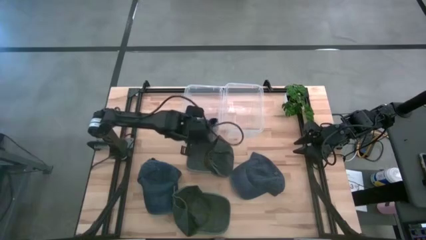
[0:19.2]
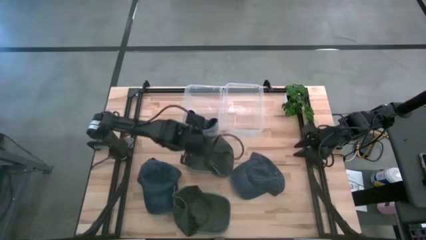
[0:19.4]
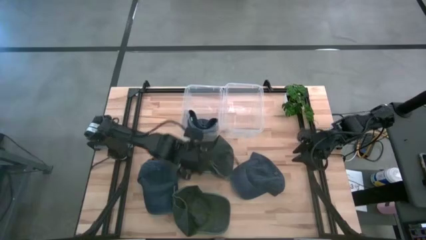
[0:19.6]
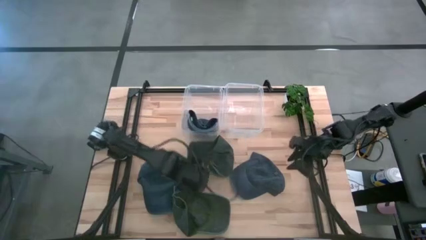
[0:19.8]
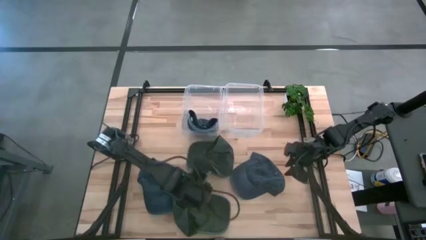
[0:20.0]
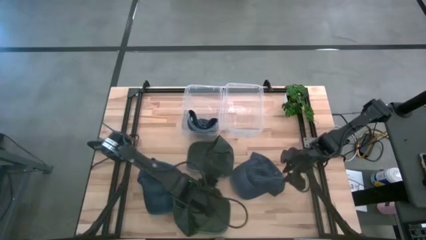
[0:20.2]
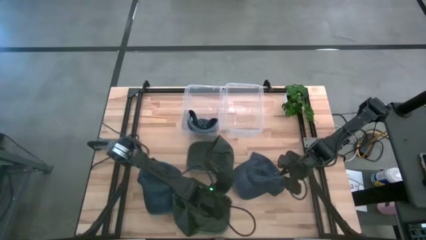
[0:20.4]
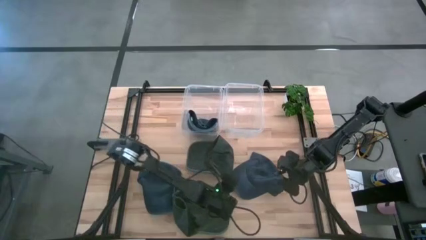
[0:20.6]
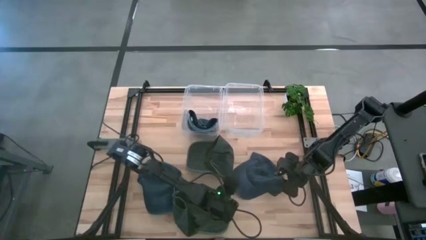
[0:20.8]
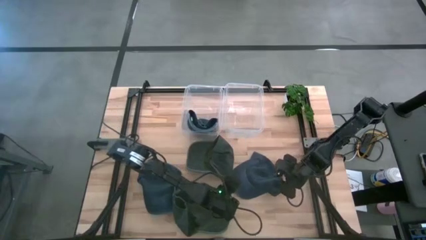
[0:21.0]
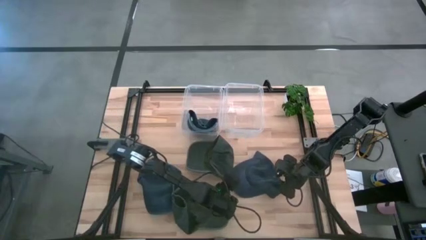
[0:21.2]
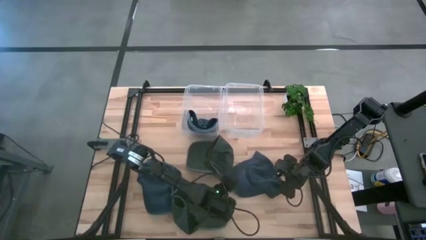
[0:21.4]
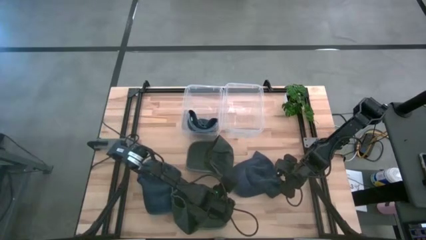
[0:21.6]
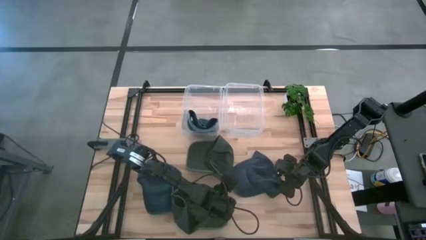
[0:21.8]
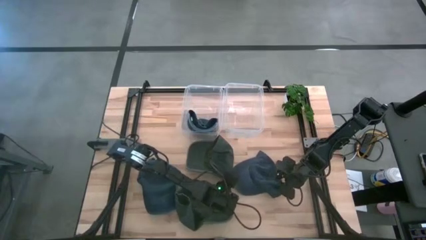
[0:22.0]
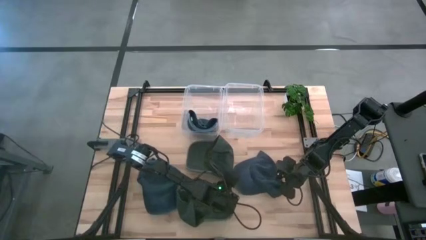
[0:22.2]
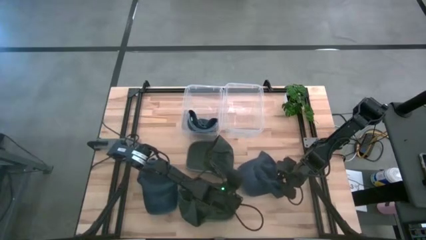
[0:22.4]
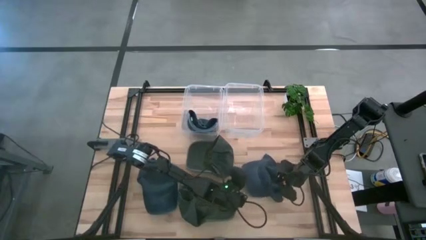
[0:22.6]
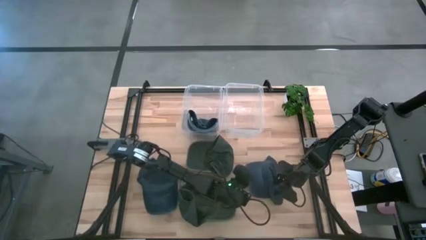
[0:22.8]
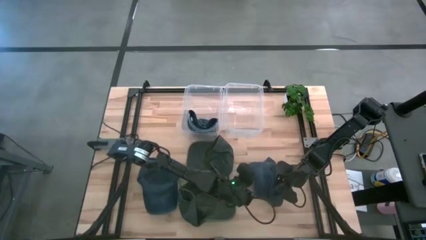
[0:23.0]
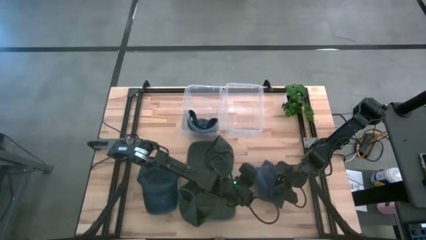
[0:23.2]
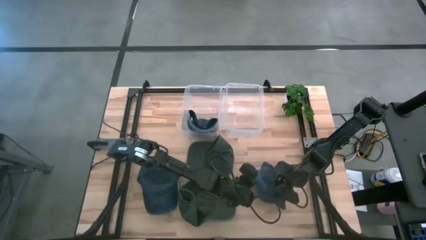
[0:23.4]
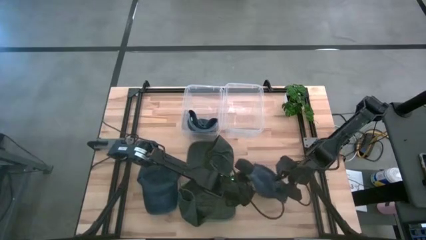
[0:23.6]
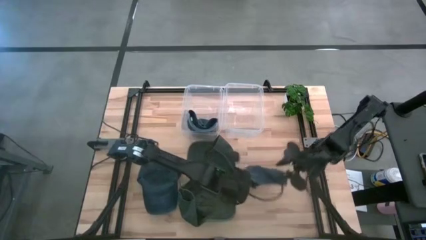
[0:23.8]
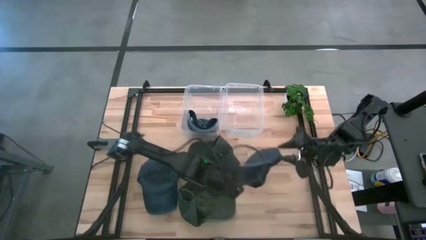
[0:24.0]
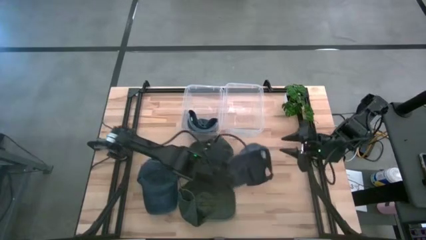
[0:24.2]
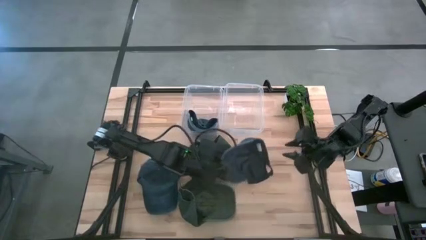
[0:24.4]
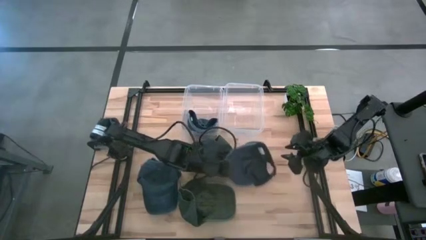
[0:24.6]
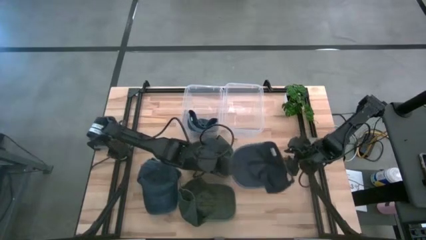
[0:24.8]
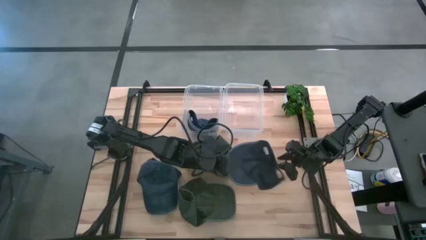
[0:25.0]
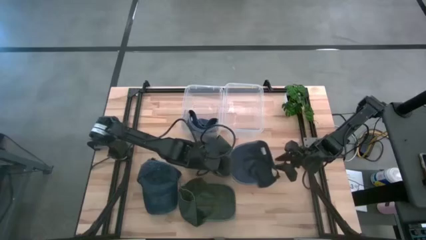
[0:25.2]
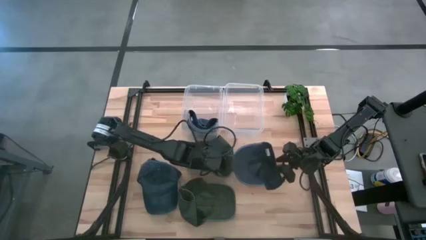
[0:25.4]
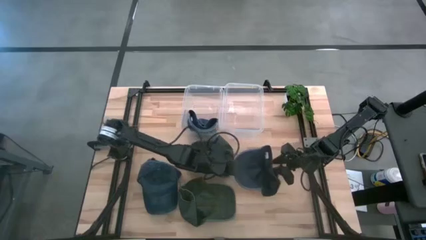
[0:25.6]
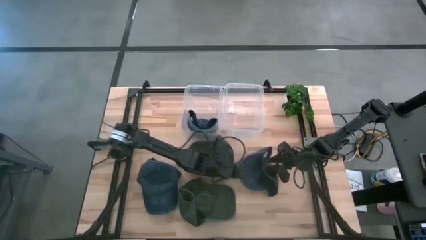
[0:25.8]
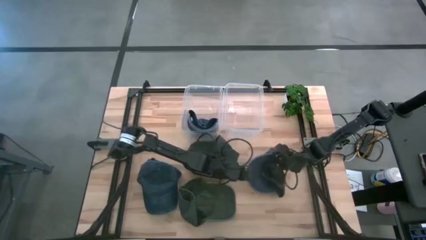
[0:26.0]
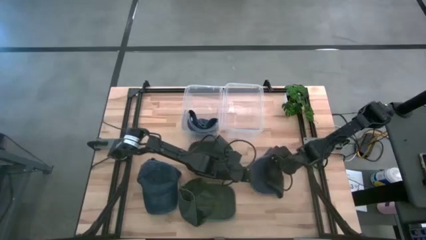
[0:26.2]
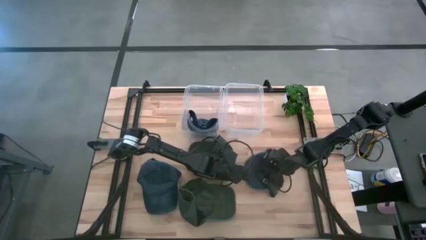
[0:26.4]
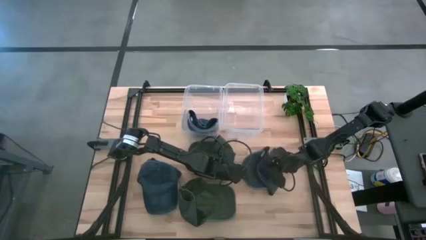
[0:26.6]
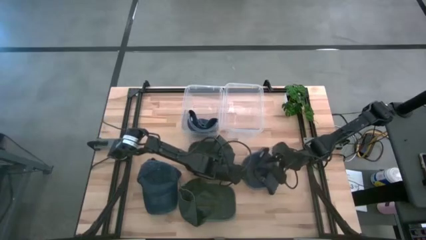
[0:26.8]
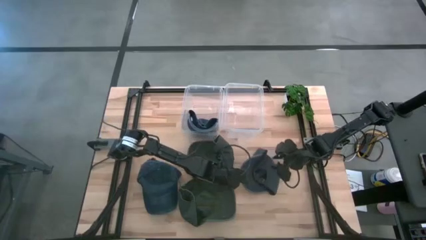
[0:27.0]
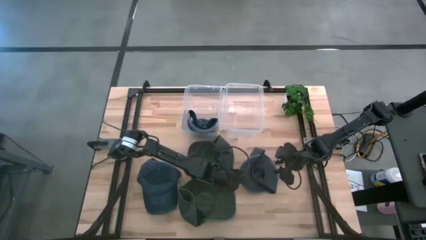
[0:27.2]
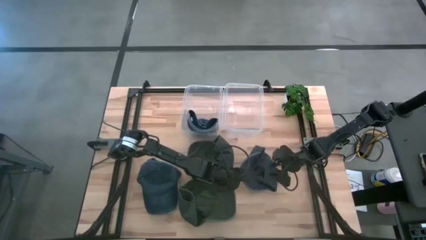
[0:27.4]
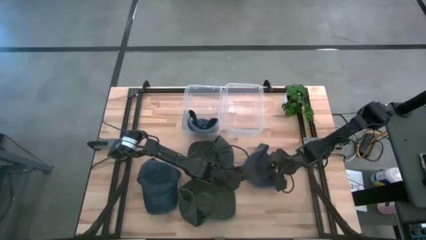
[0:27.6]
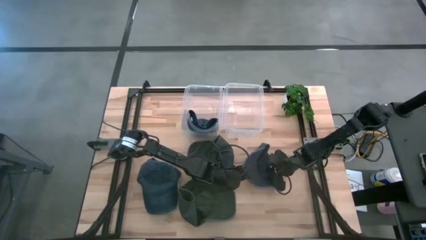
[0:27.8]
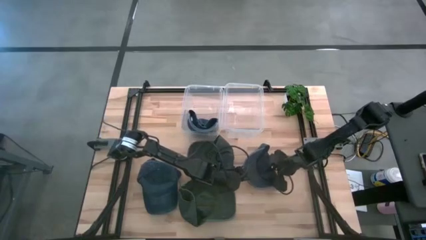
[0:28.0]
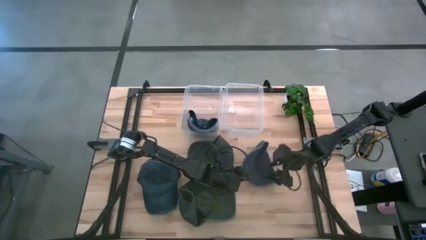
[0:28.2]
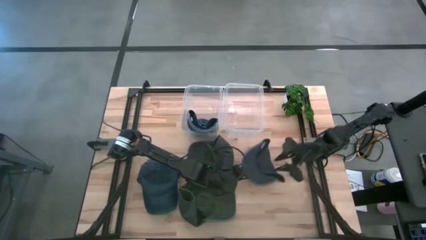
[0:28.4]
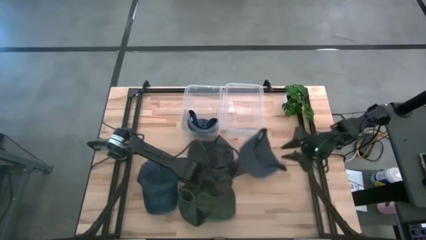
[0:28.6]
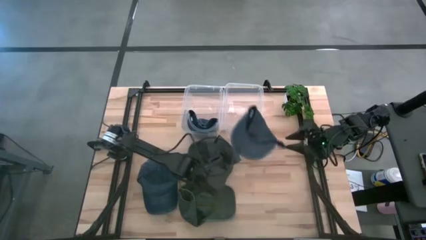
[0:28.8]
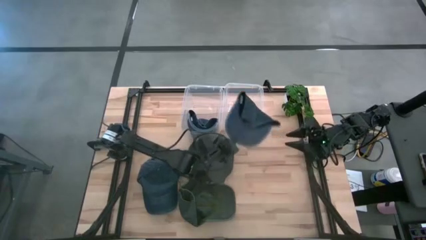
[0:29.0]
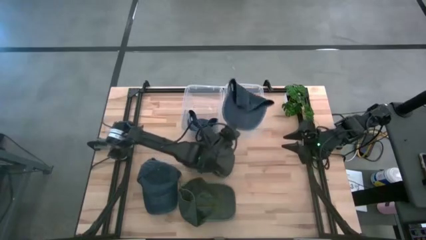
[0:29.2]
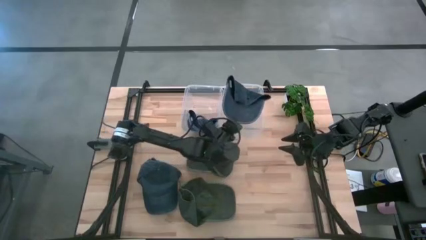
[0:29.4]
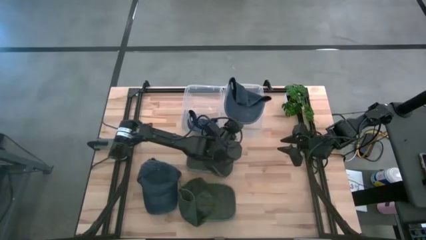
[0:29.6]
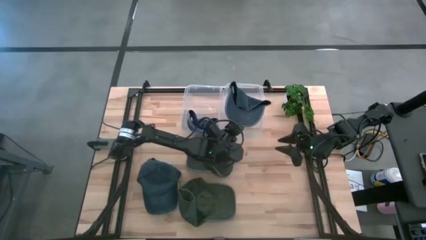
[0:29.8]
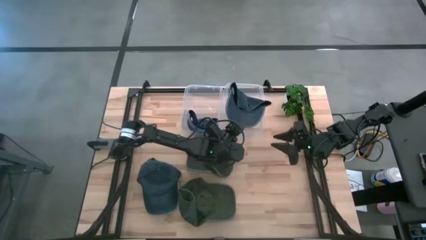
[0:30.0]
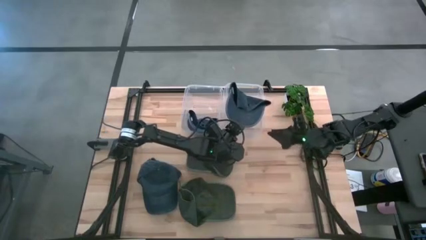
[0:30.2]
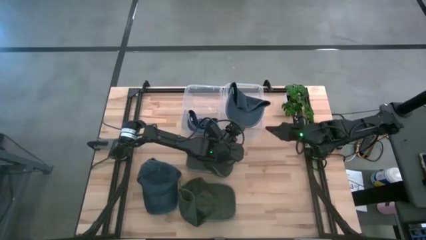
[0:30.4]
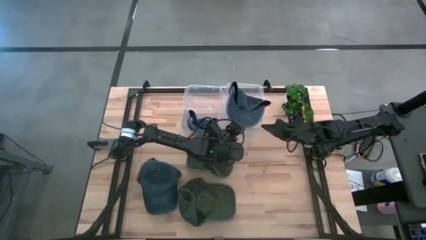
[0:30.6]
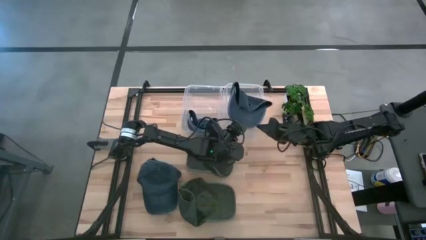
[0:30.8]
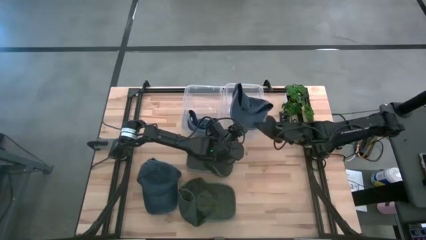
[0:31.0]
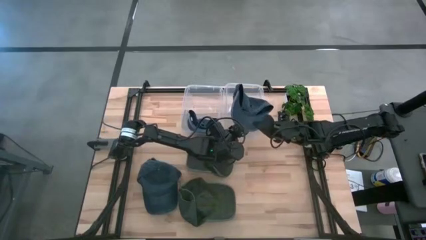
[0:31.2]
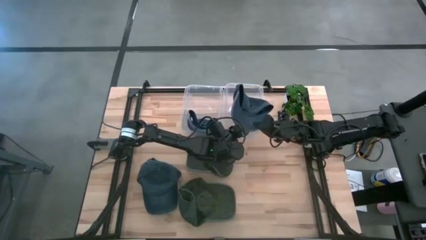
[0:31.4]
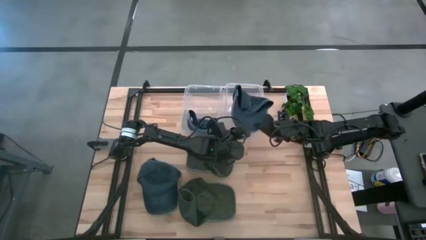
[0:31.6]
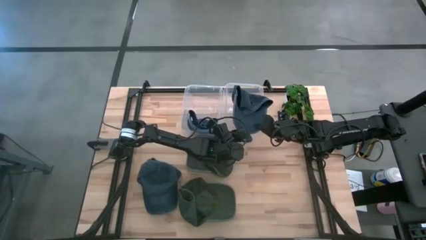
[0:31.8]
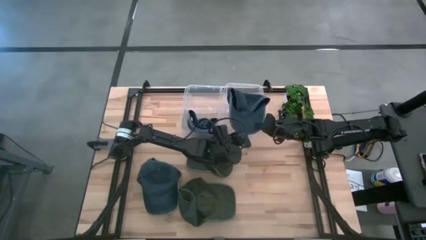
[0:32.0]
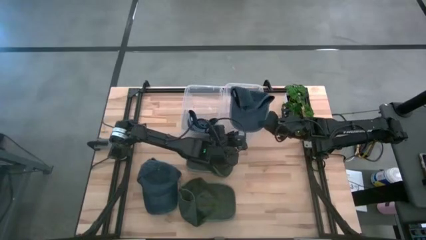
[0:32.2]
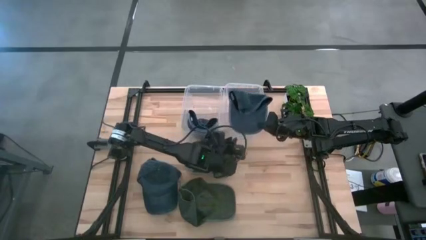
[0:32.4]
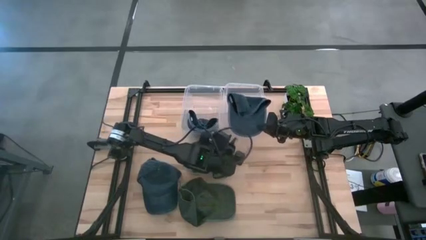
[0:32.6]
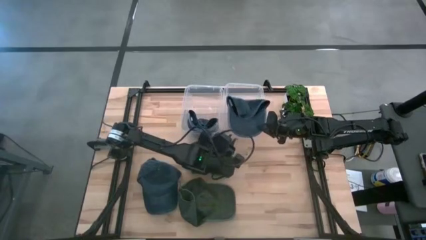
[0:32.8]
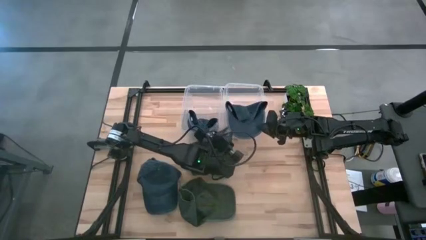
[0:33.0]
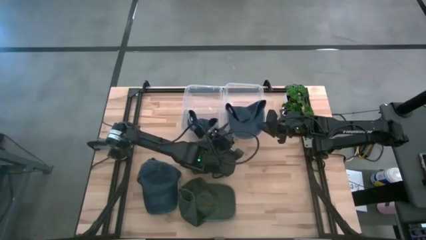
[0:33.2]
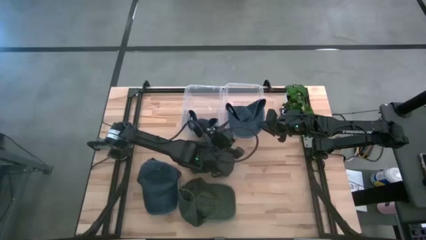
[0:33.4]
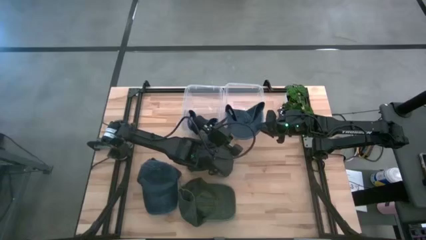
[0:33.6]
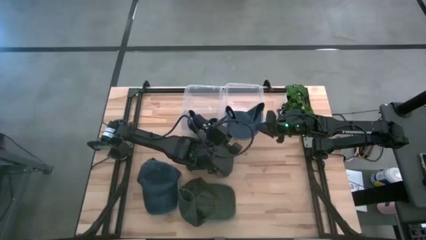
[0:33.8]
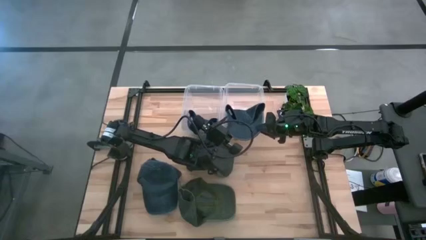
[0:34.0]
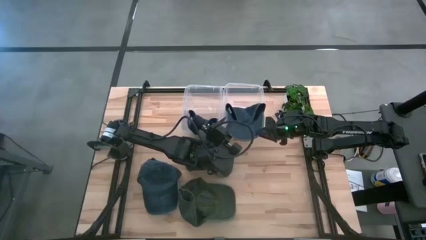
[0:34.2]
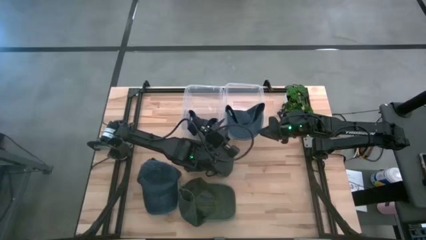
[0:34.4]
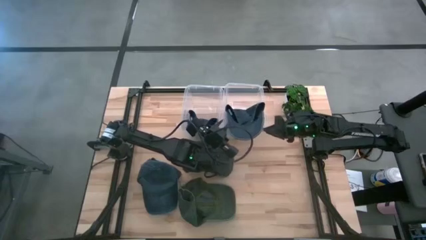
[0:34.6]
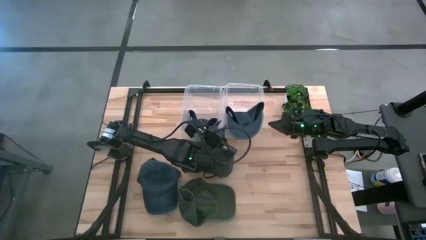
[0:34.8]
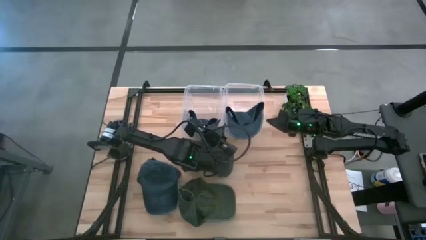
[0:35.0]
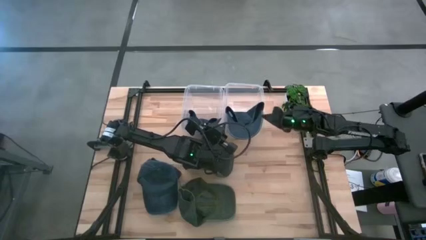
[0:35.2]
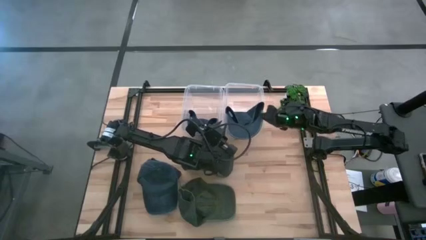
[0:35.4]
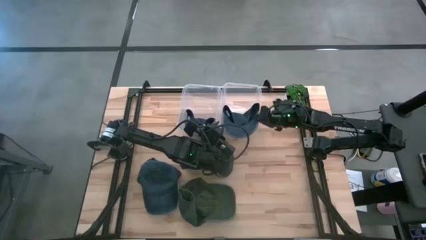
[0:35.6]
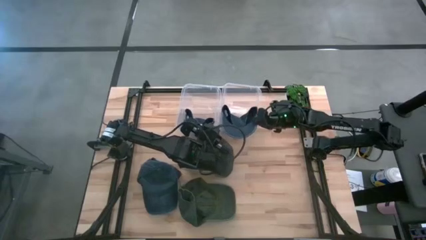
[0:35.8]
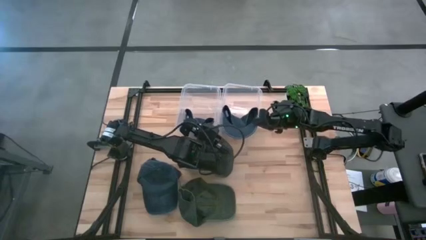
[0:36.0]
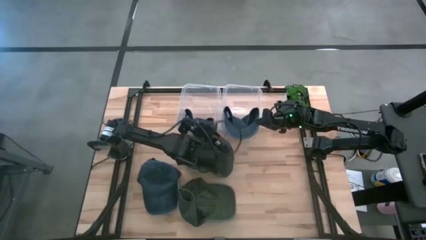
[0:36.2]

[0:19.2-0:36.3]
Task: Pick & Place hat
Put the right blue cap into the left transparent bin
